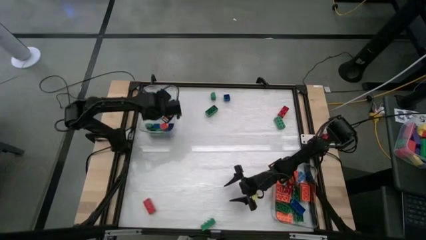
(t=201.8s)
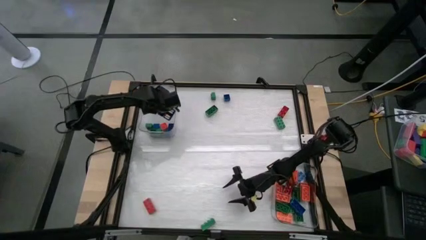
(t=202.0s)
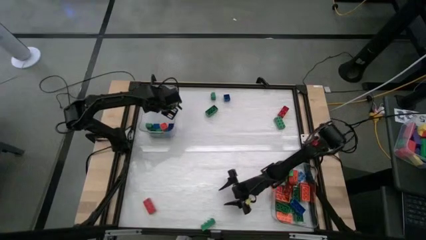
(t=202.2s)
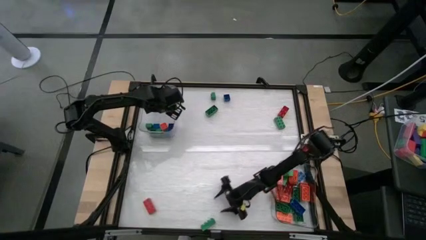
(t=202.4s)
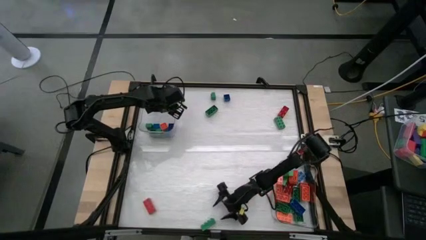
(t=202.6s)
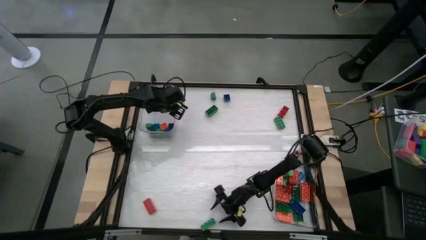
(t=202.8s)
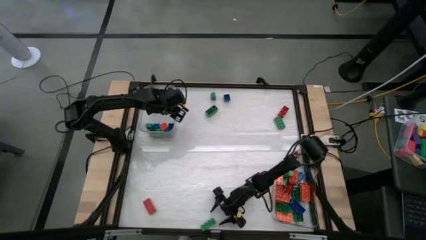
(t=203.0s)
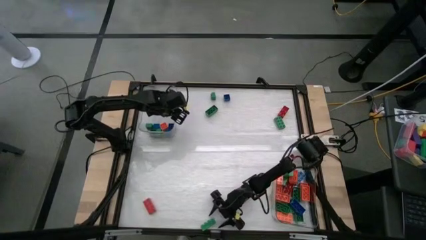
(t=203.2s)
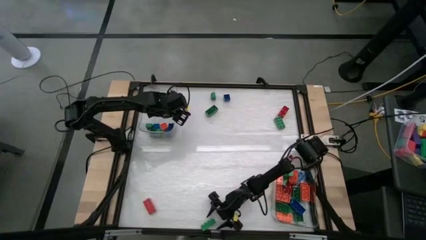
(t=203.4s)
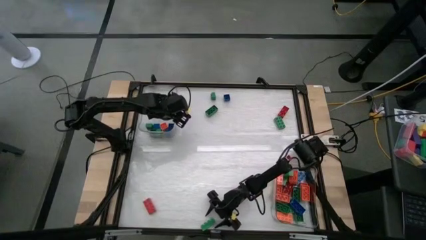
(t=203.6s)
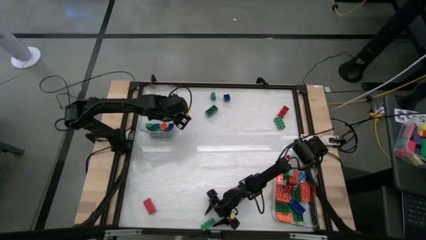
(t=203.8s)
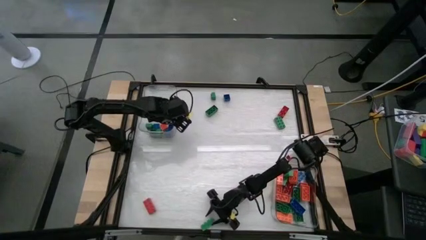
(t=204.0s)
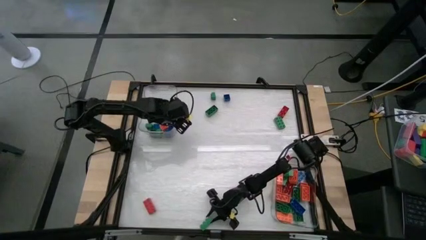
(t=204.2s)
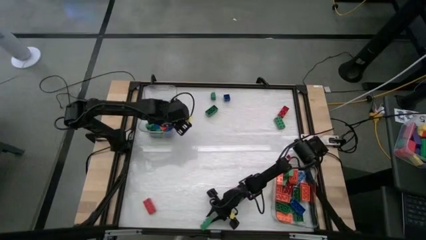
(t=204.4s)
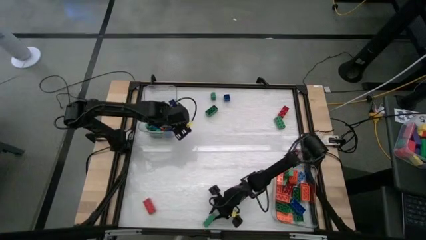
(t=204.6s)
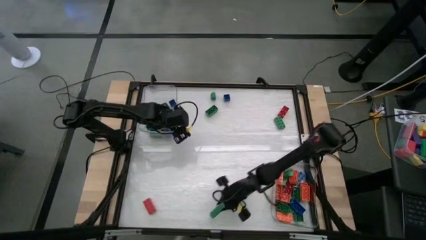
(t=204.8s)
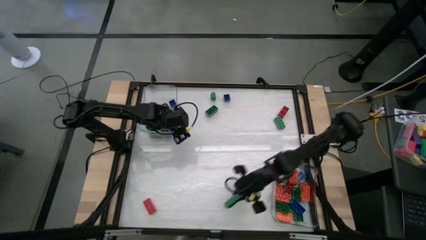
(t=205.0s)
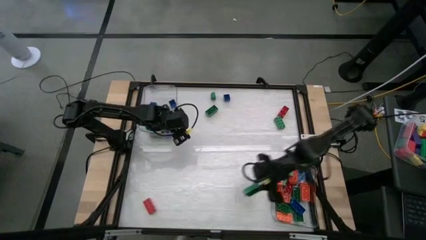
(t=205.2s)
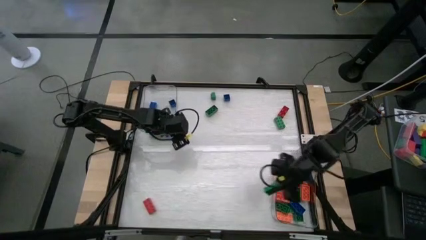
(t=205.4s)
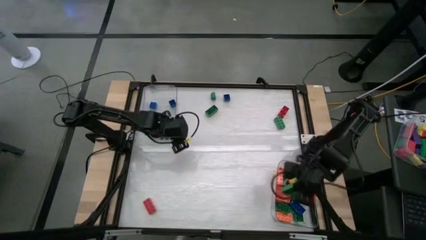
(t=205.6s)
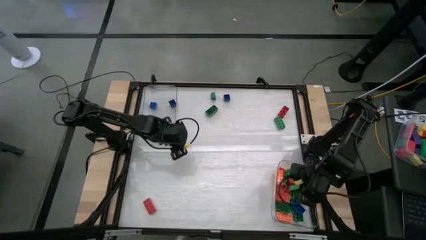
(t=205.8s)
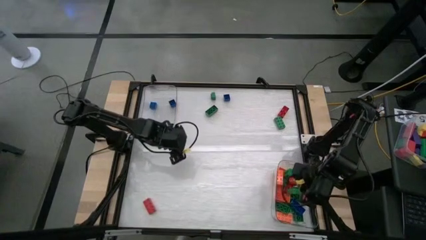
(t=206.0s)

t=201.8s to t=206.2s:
Task: Sort blocks by size
Put the 8 stud green game piece into the bottom transparent bin

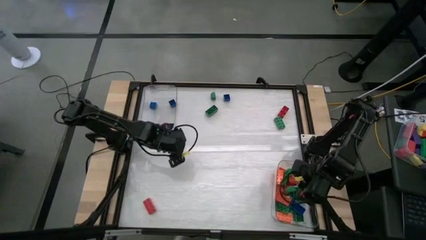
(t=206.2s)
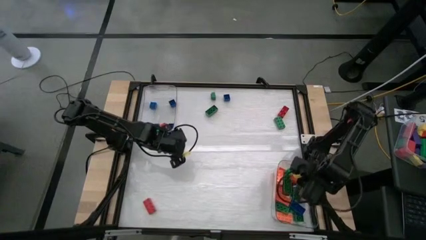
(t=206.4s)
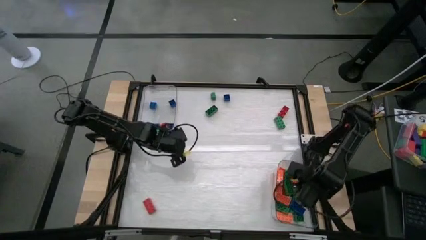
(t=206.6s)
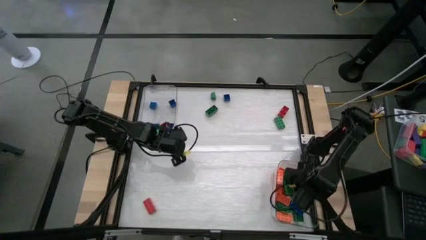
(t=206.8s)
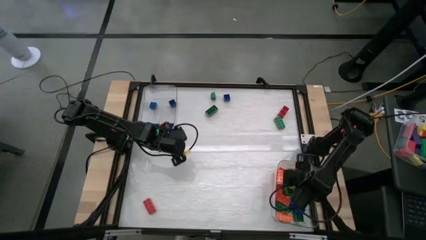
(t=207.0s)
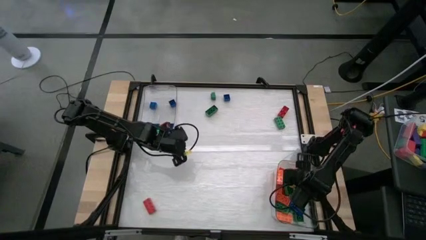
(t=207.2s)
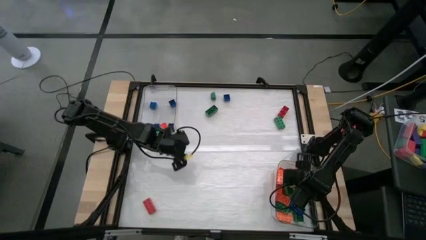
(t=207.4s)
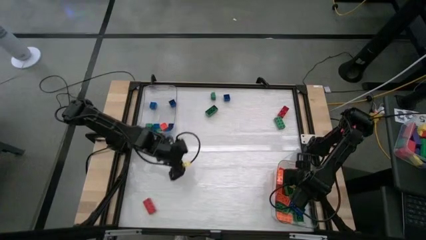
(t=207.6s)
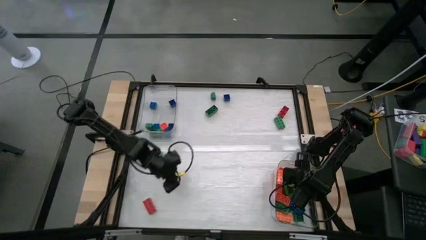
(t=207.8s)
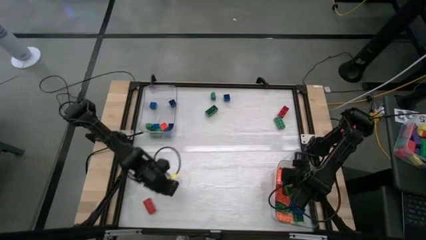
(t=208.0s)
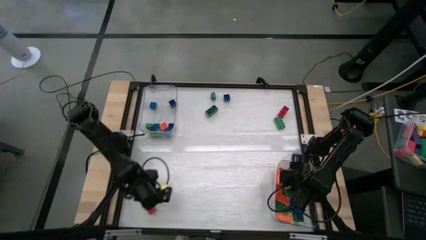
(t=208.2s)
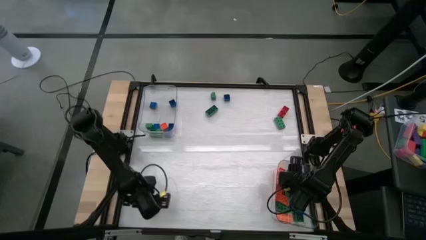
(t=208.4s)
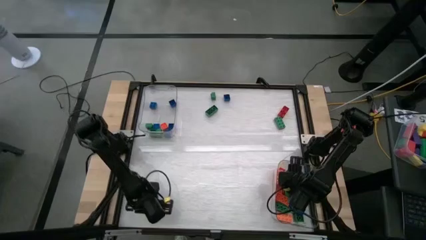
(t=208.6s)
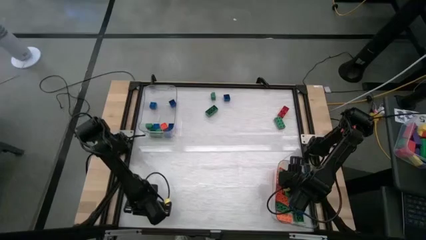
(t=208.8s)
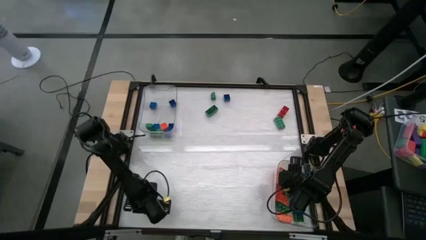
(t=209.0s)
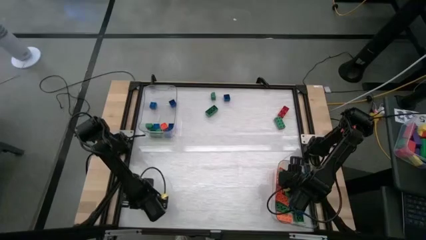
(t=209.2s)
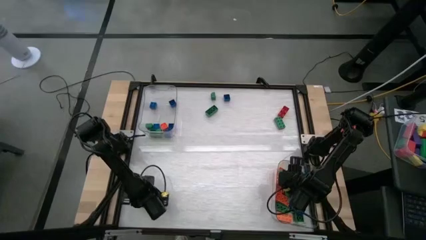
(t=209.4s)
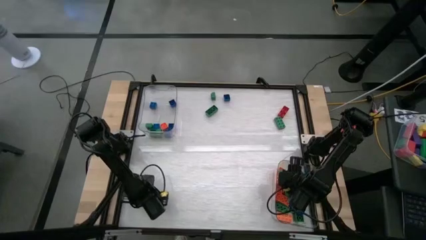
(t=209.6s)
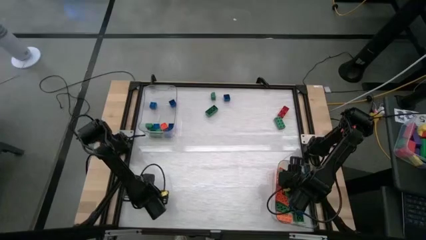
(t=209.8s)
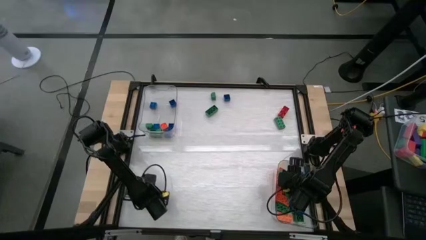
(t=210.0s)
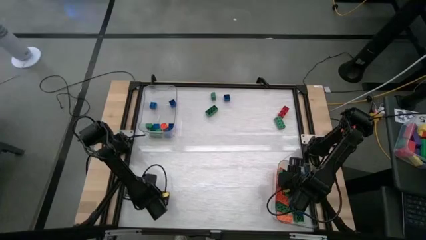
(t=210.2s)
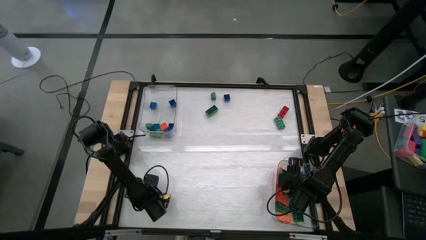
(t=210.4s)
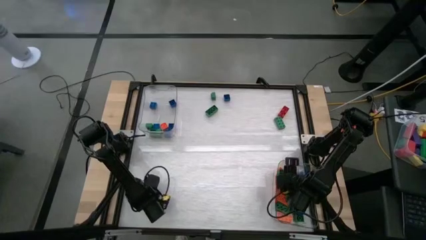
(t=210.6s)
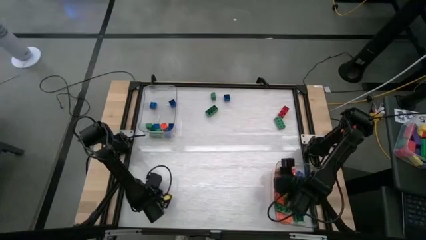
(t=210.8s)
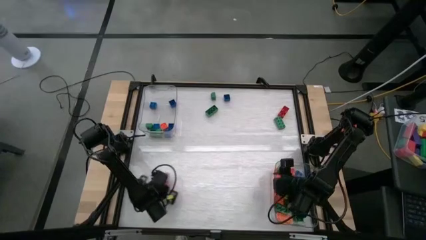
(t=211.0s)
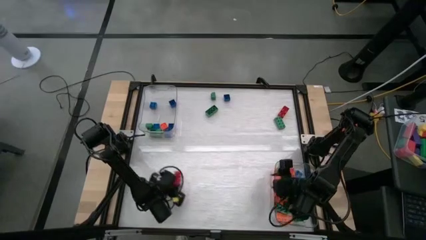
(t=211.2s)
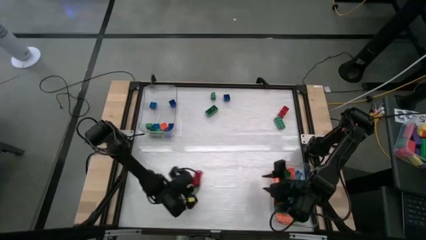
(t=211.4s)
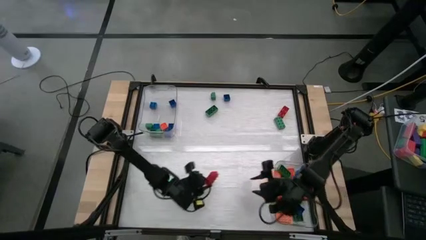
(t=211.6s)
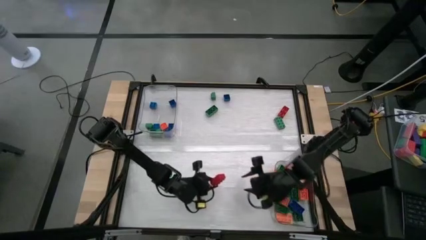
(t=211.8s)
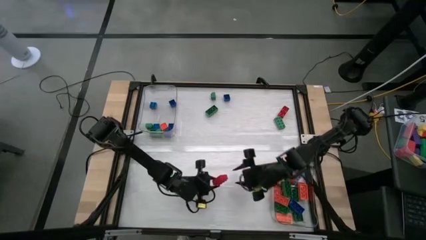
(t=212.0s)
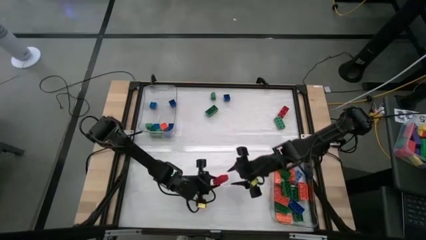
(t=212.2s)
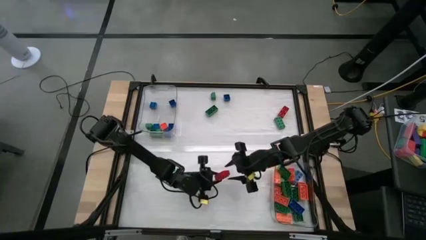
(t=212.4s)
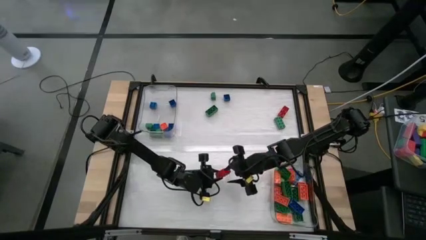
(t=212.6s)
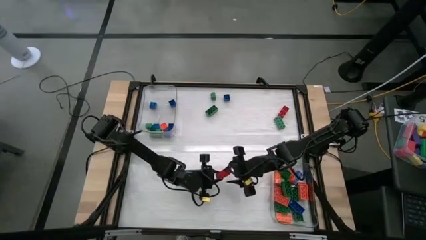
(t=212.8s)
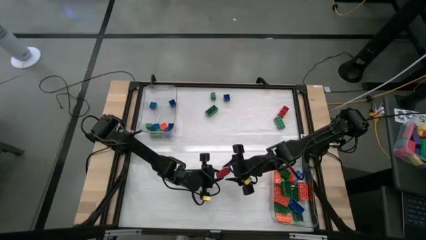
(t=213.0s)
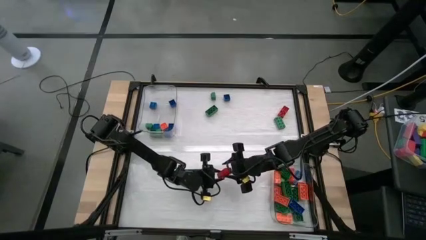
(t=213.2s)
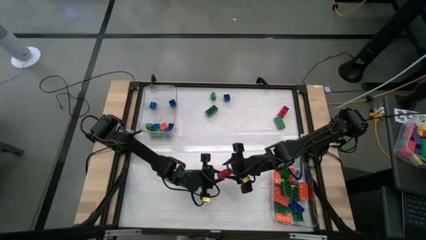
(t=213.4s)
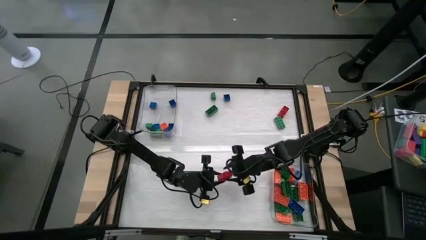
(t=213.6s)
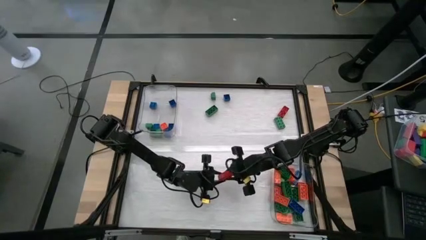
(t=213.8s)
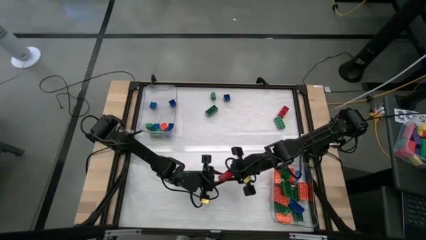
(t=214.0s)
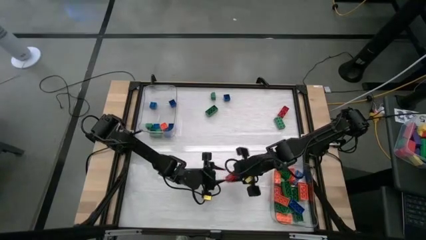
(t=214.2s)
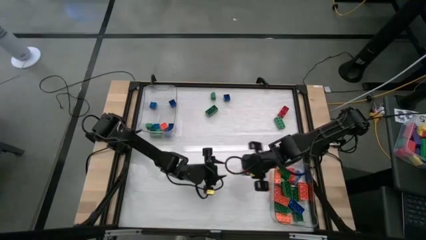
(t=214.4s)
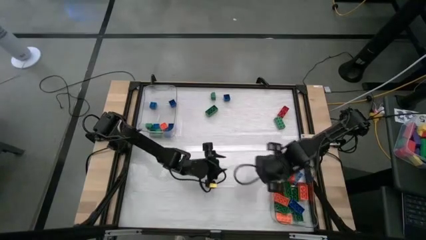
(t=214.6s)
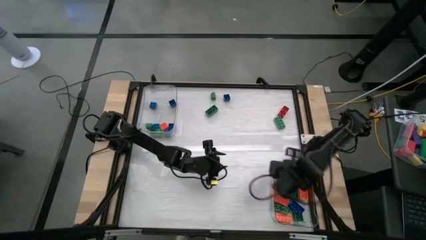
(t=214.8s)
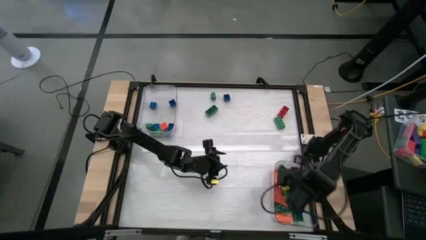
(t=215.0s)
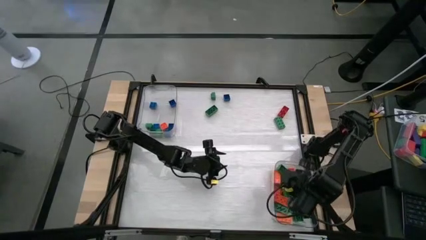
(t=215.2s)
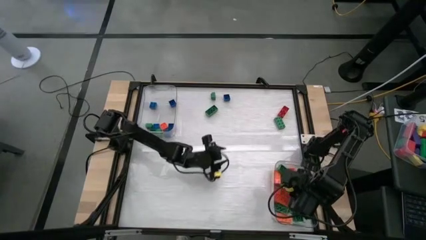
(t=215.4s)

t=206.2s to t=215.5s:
Put the 8 stud red game piece into the bottom transparent bin

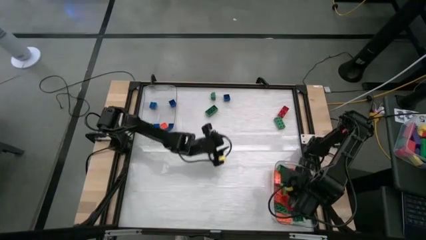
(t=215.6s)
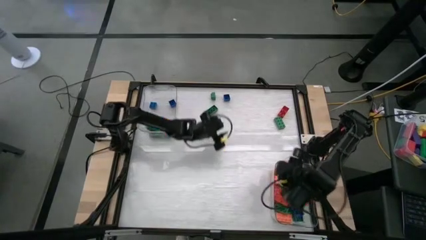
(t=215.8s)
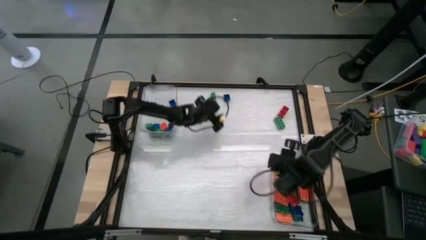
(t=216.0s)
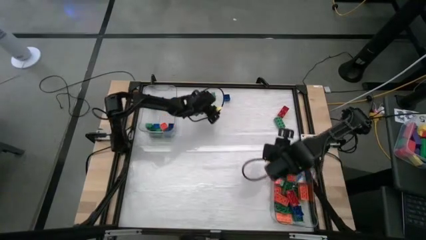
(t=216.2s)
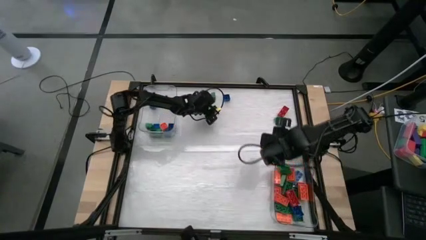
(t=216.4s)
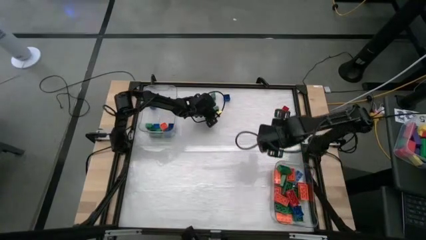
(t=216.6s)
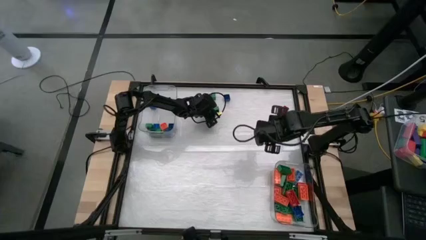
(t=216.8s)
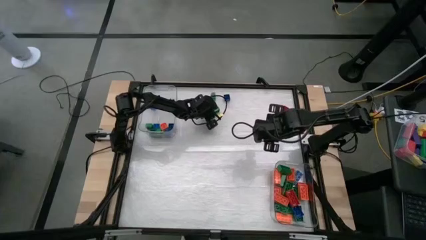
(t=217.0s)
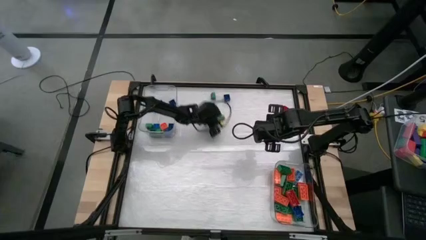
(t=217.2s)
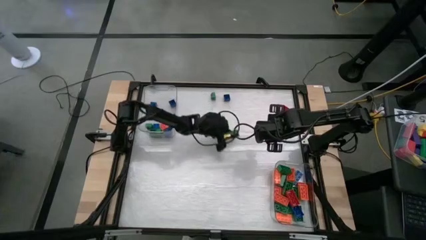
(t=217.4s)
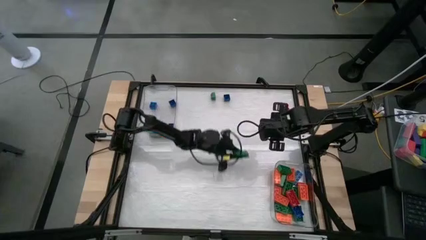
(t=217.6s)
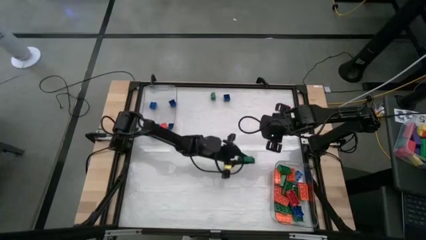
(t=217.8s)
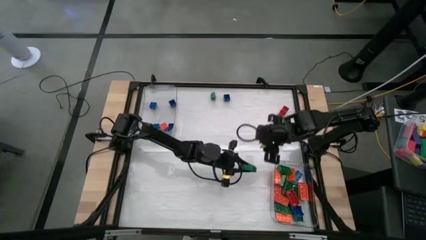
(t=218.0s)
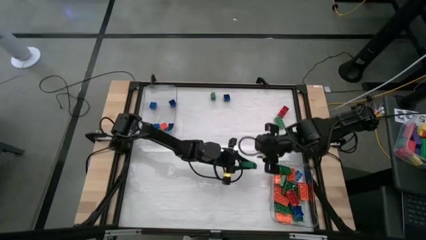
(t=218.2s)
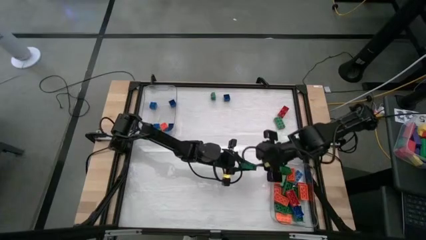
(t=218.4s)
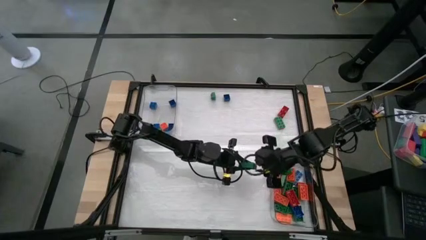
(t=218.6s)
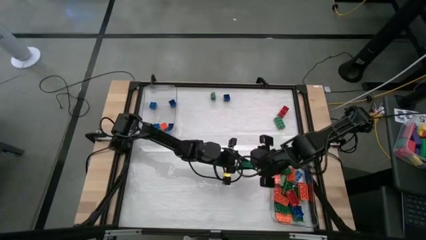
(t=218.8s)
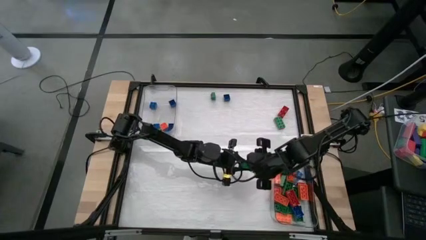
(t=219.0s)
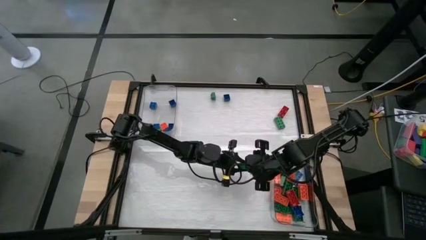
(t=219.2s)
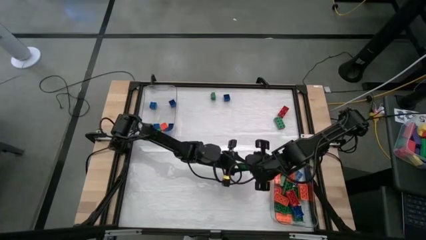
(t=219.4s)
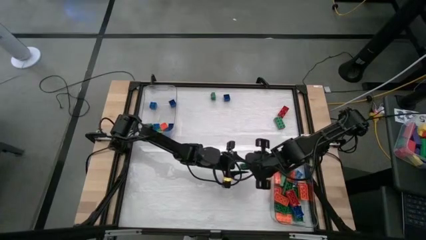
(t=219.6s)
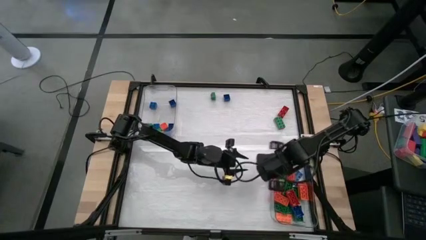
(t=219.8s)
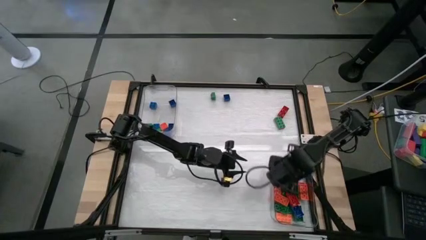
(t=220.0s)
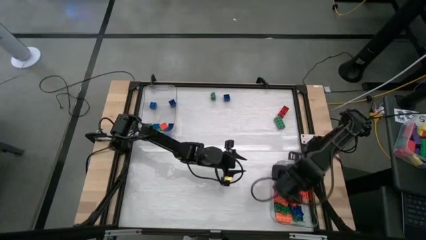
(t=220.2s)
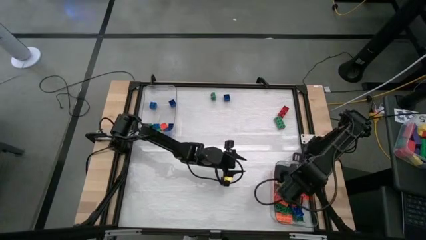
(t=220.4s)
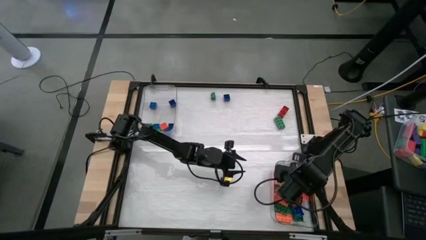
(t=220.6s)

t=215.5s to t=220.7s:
Put the 8 stud green game piece into the bottom transparent bin
